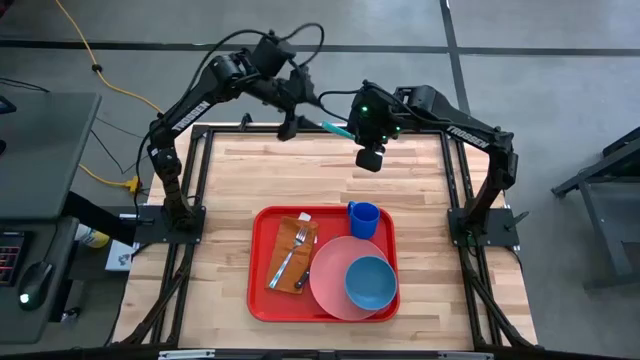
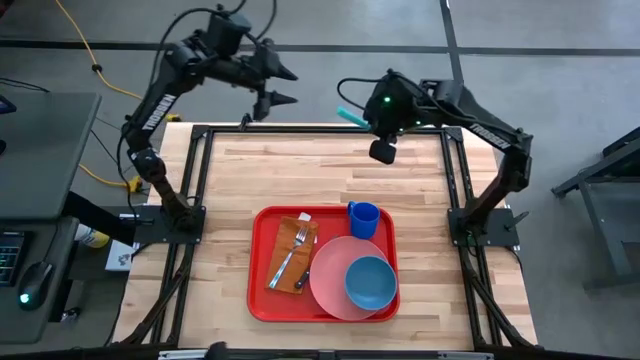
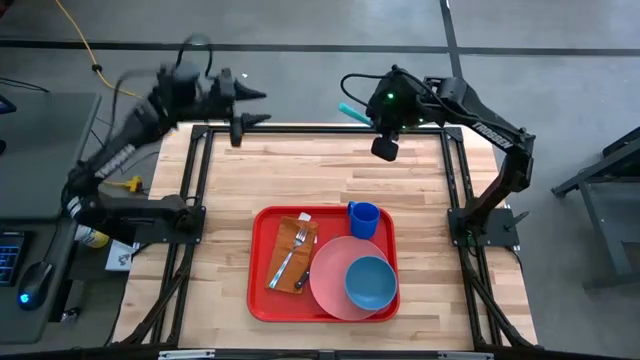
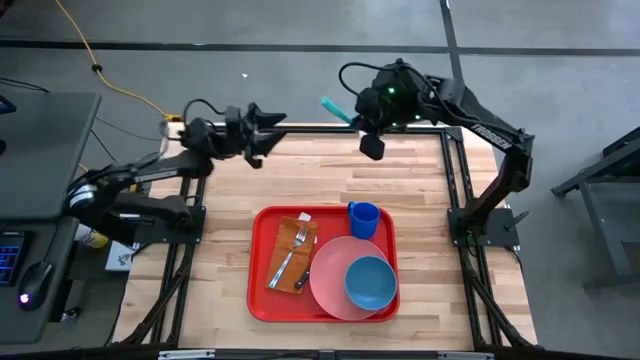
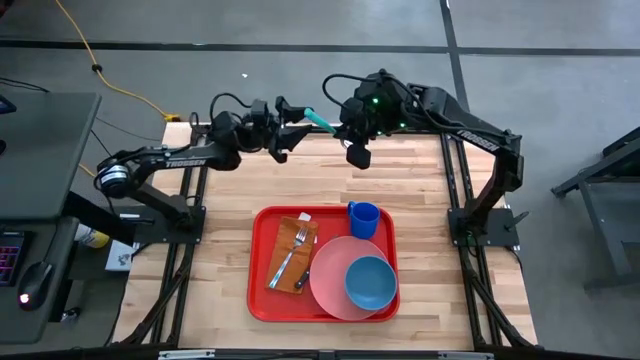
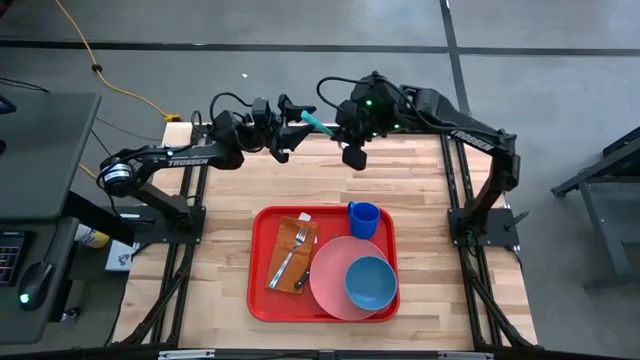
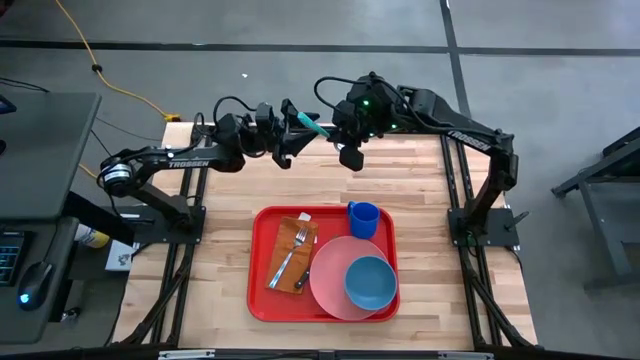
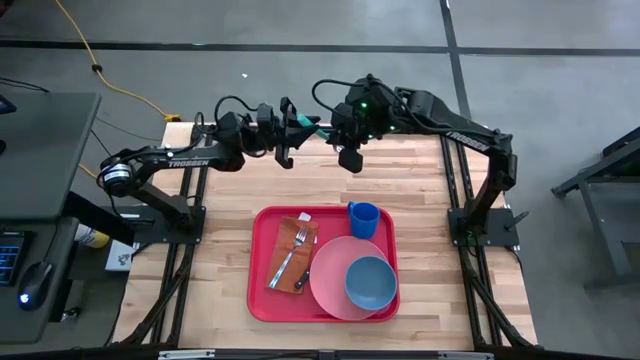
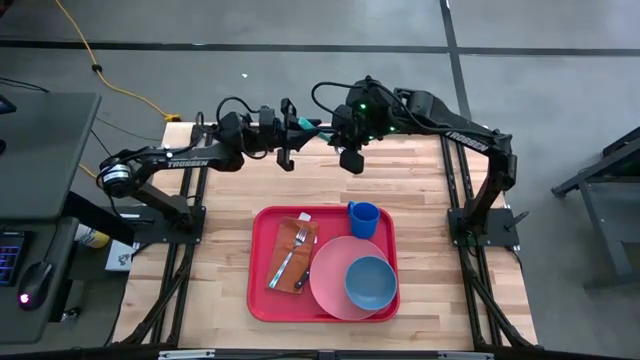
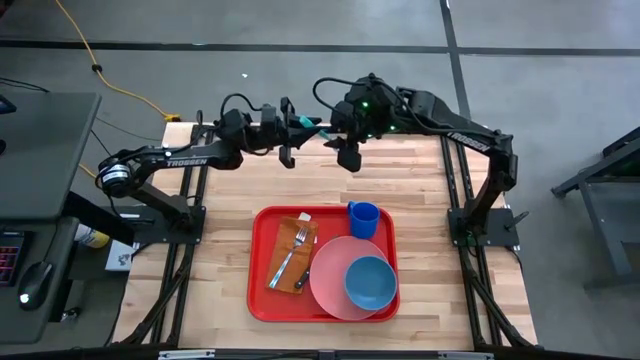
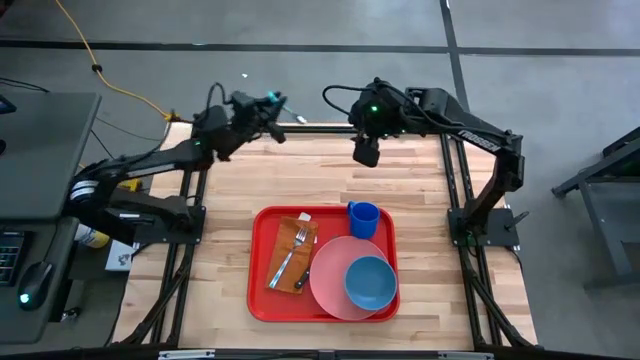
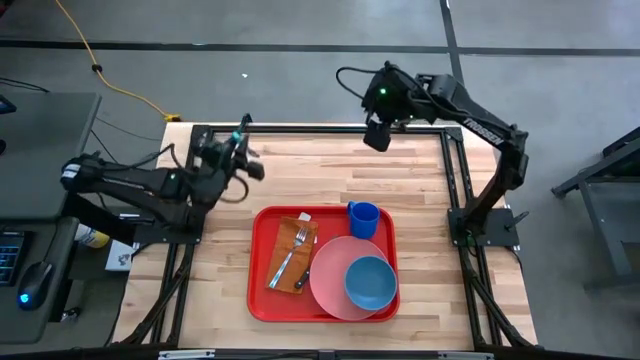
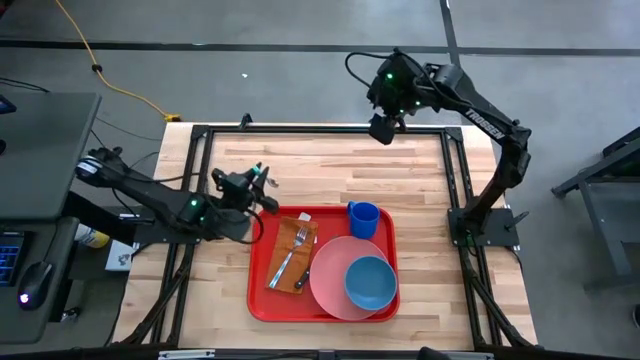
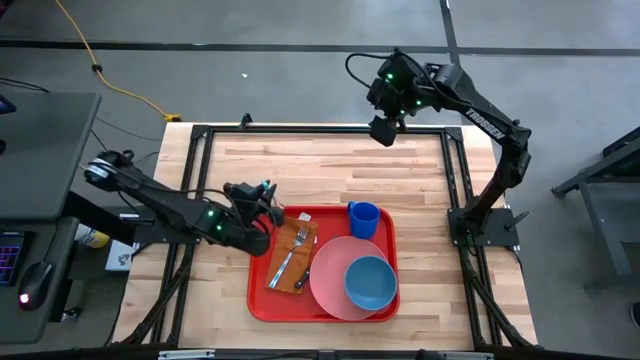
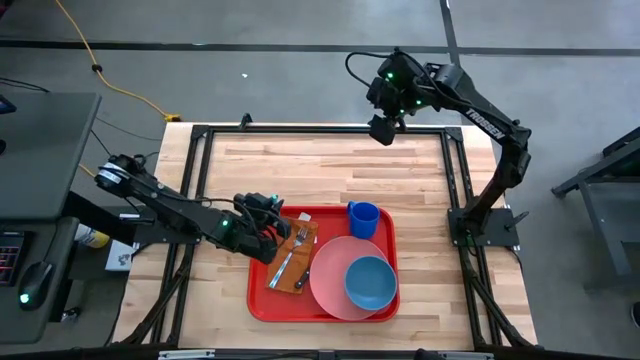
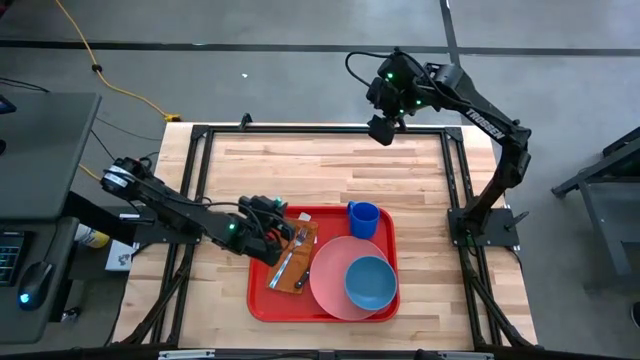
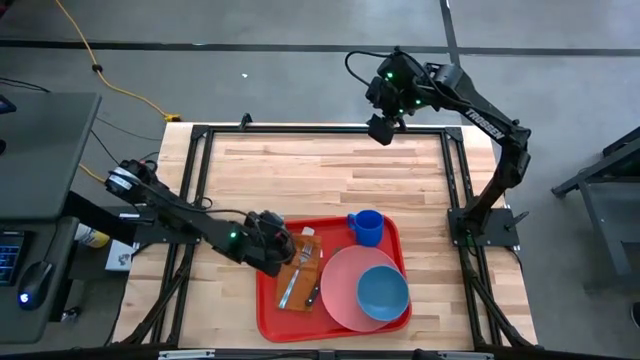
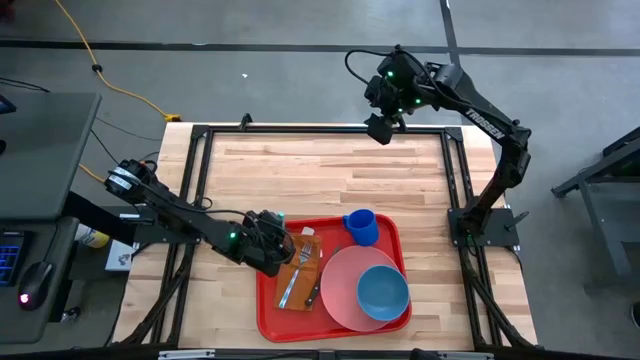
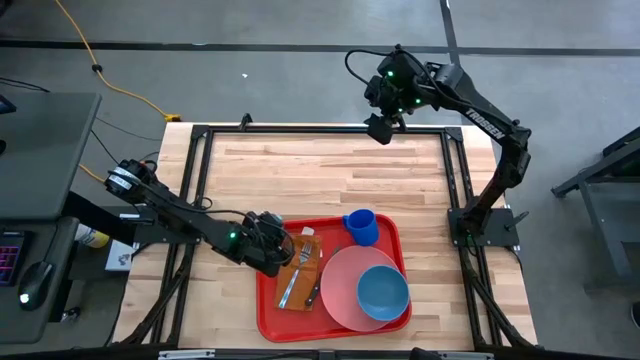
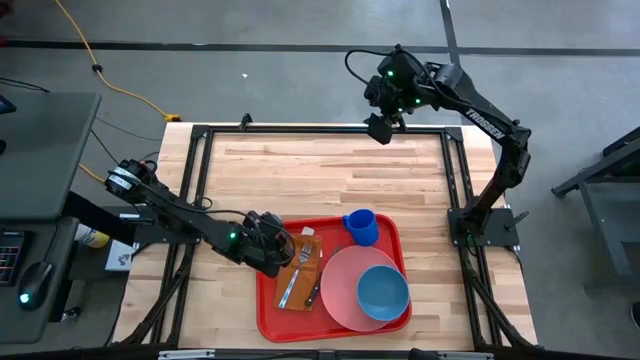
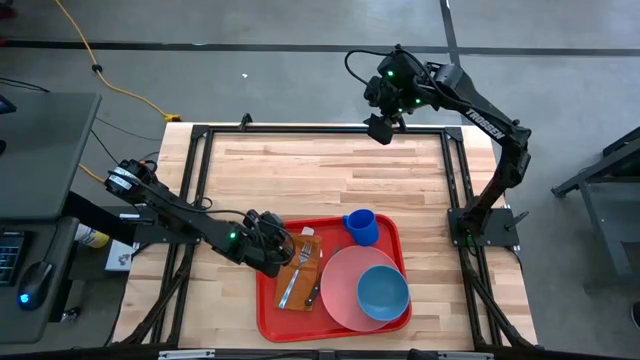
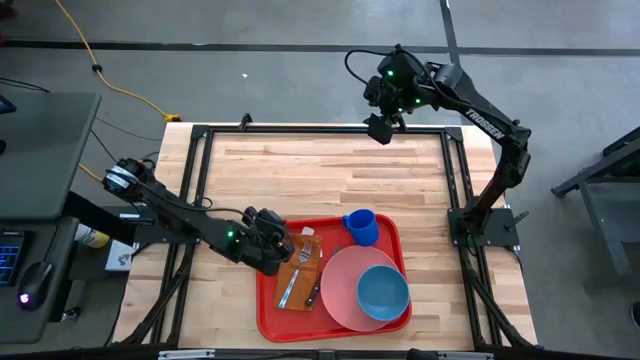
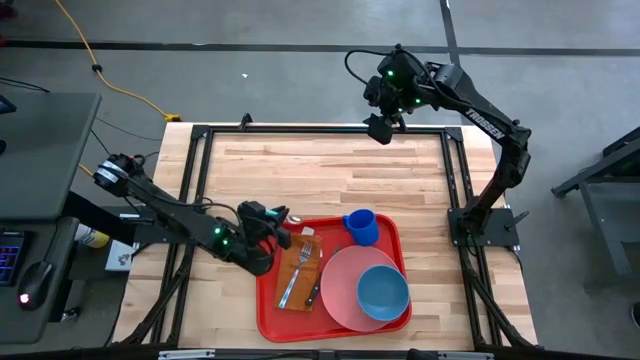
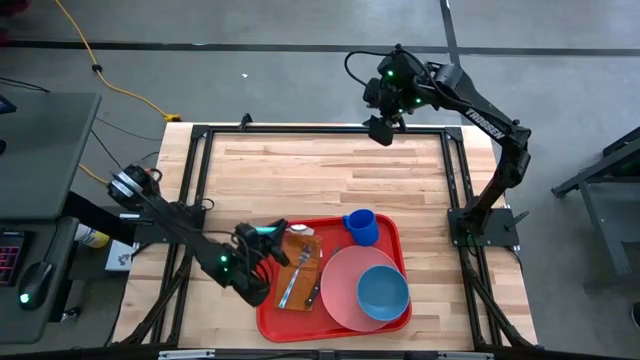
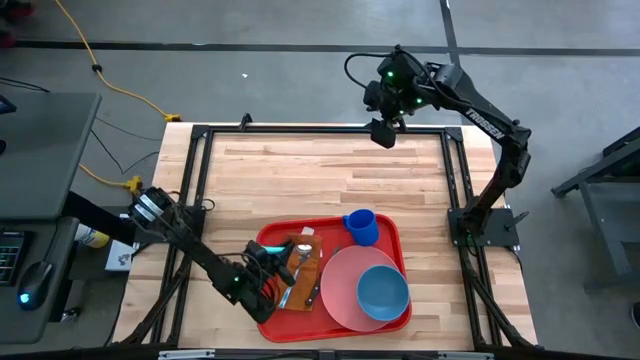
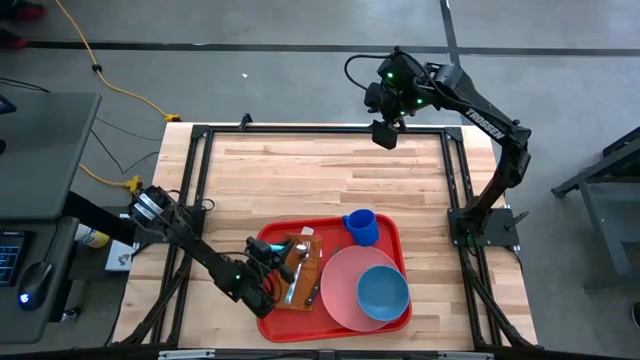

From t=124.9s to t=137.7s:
Task: Set up tray
Put the blue spoon on top of the orange napkin on the serving tray

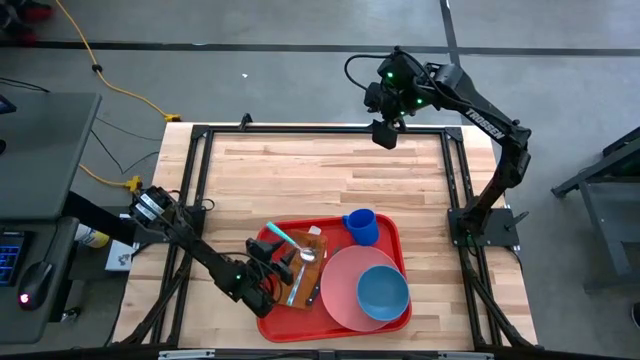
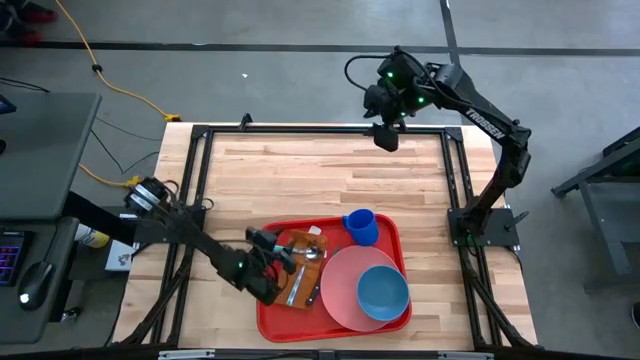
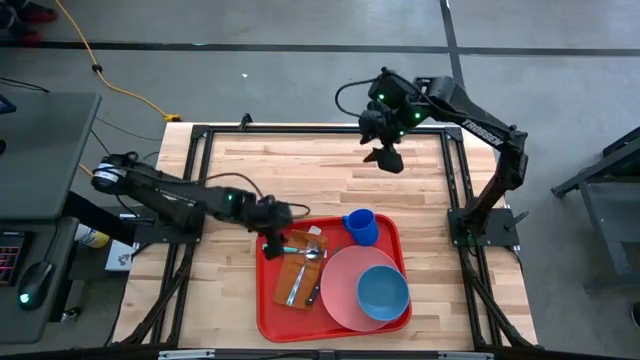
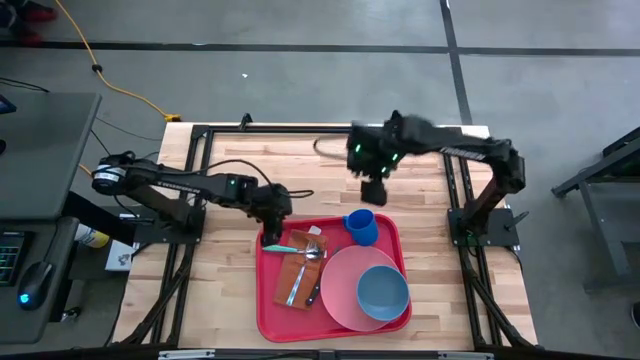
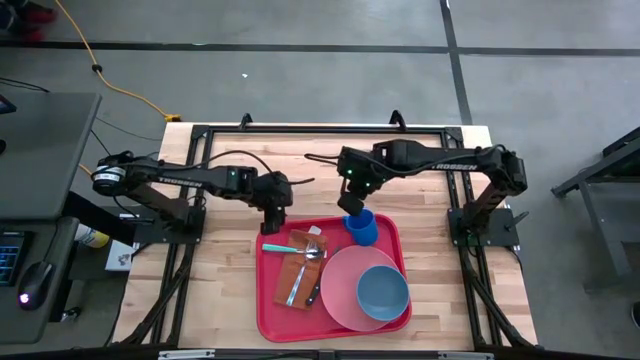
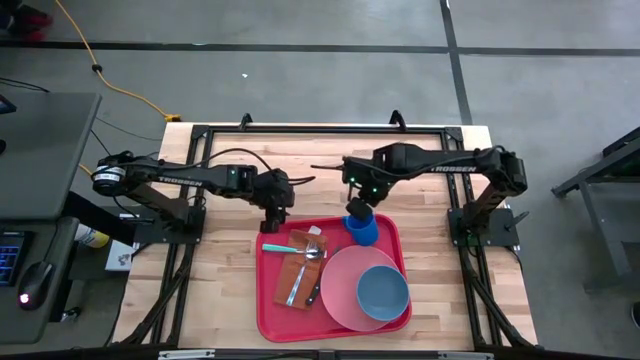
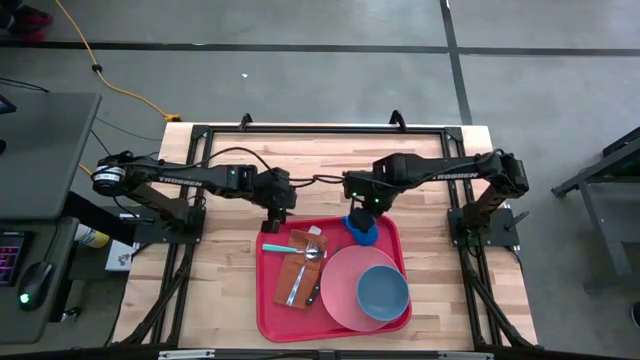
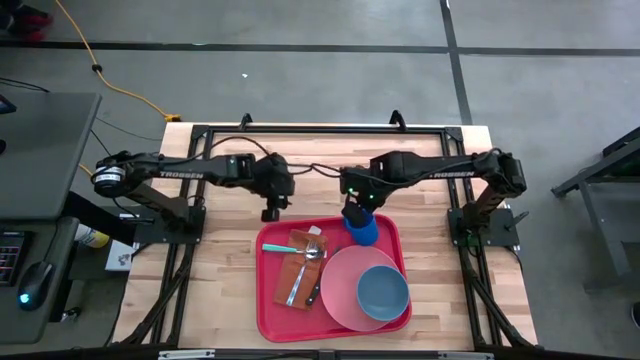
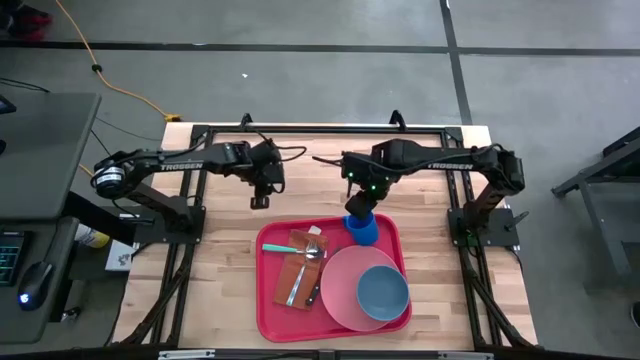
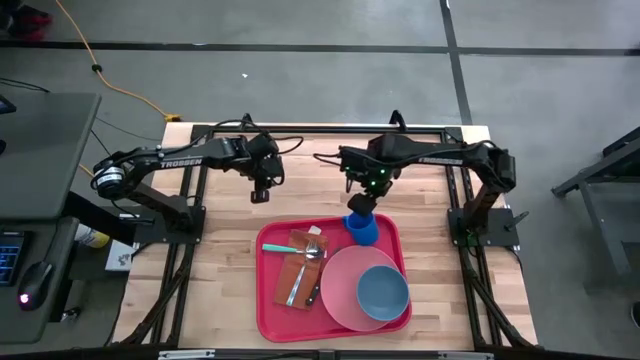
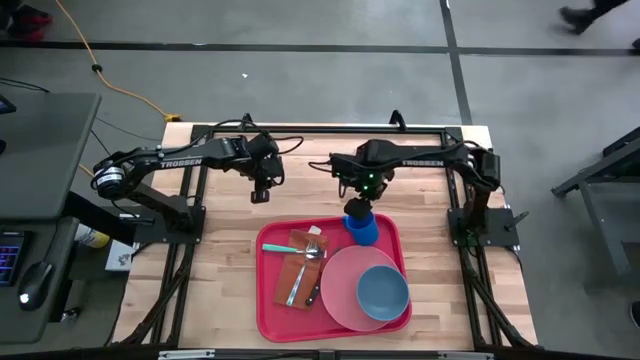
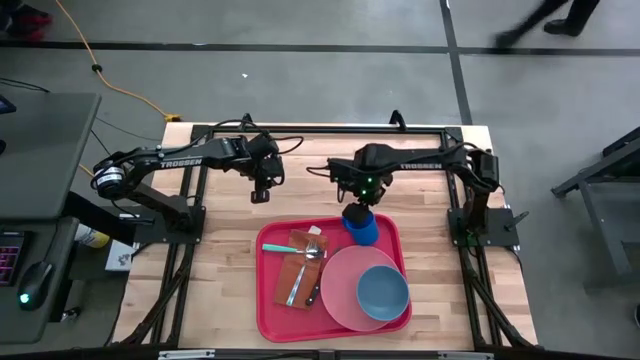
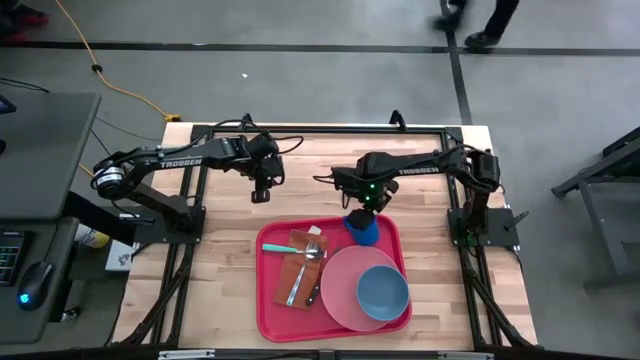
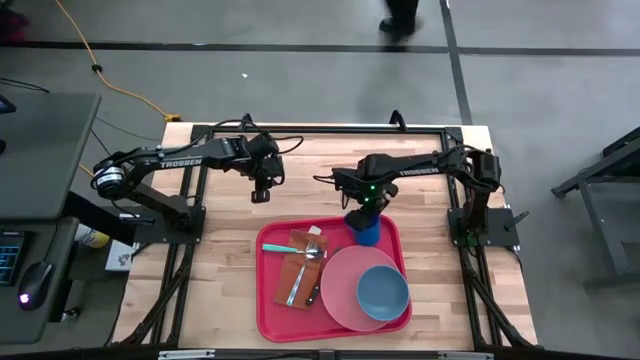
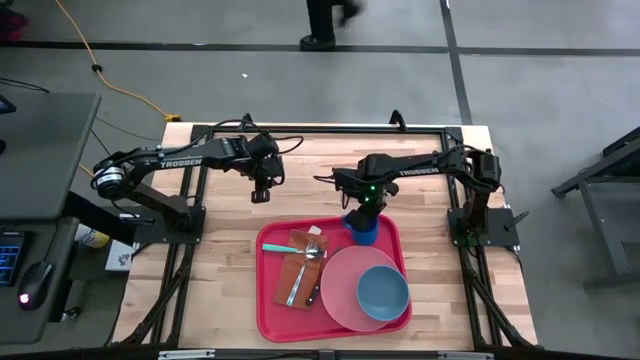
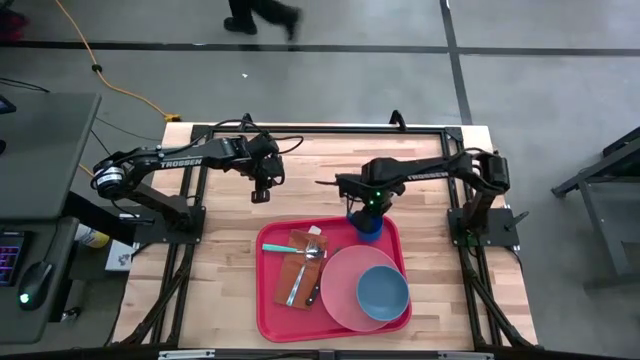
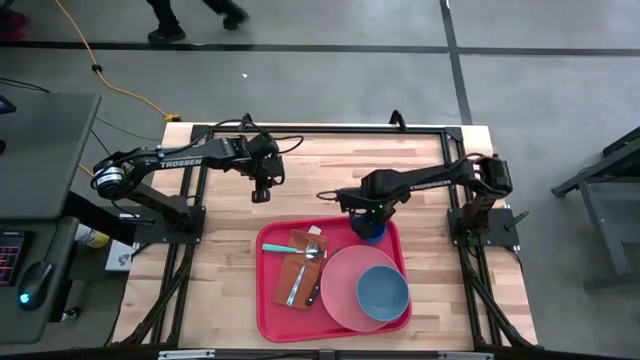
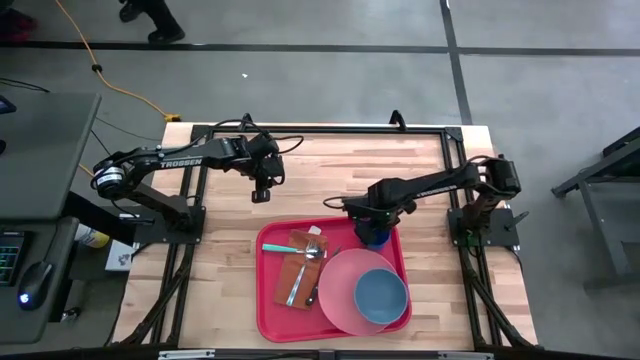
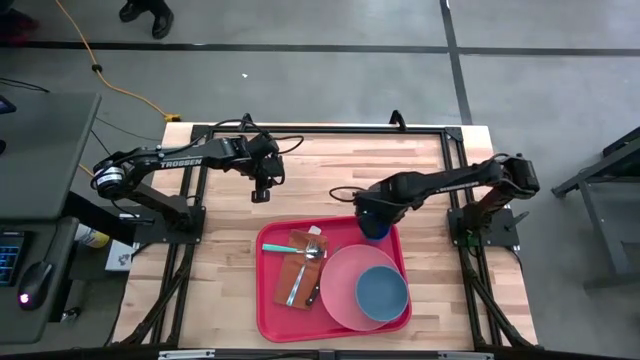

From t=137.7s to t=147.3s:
Adjust the blue mug on the red serving tray
